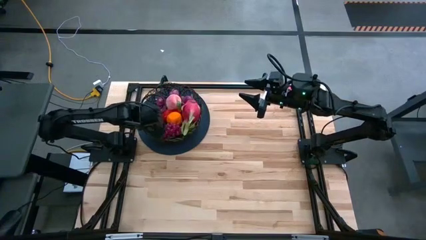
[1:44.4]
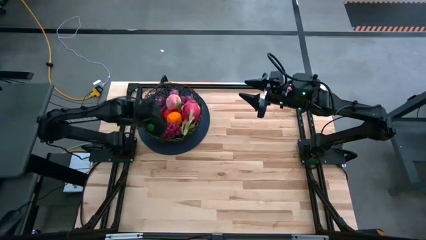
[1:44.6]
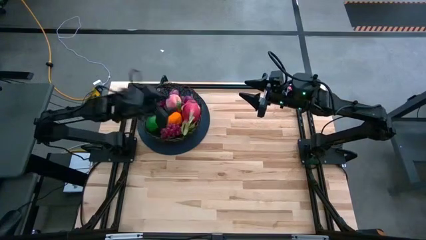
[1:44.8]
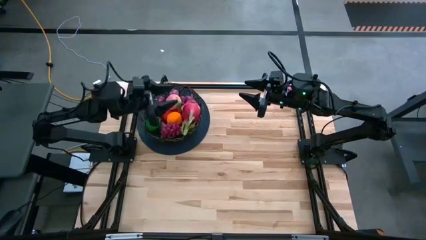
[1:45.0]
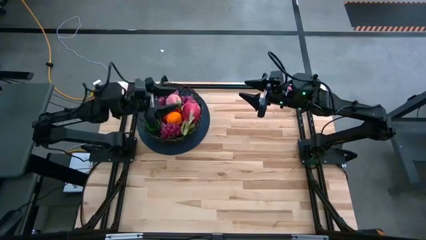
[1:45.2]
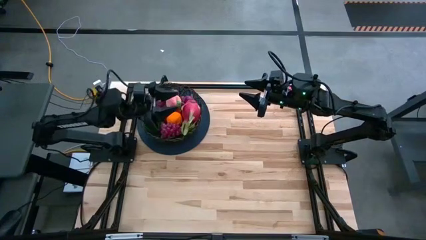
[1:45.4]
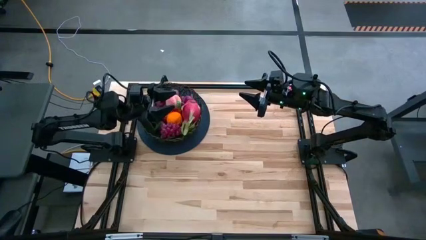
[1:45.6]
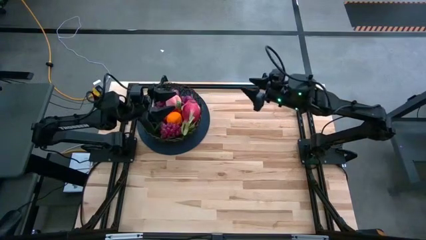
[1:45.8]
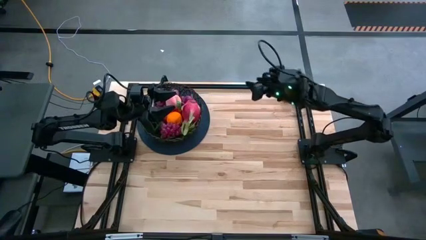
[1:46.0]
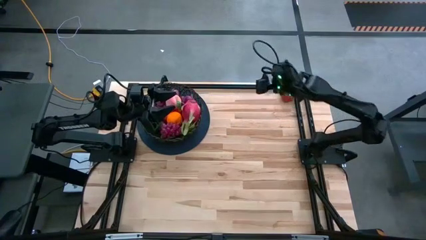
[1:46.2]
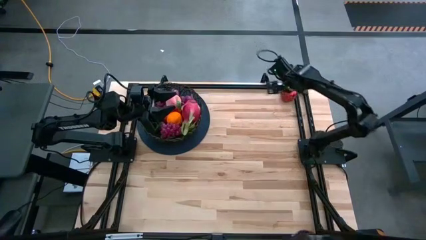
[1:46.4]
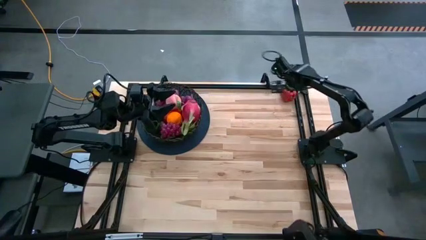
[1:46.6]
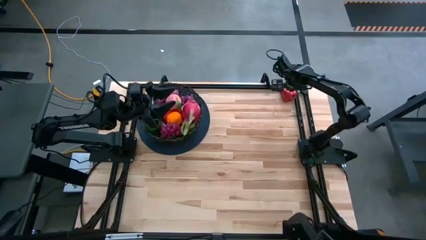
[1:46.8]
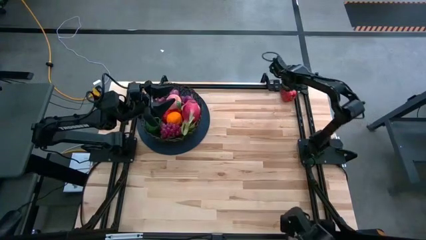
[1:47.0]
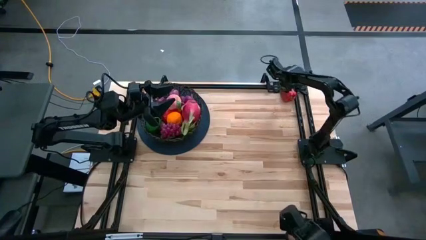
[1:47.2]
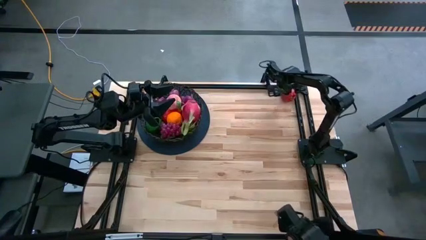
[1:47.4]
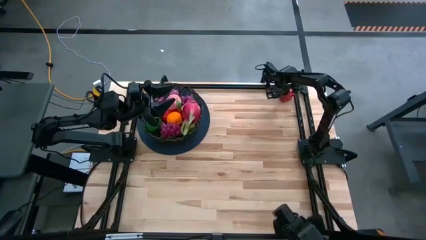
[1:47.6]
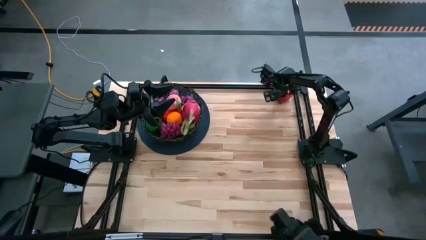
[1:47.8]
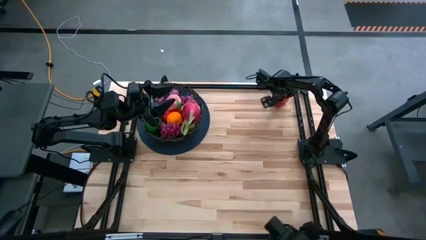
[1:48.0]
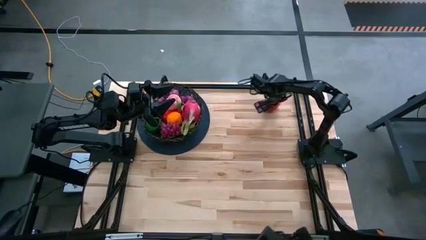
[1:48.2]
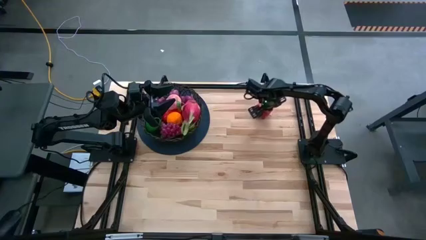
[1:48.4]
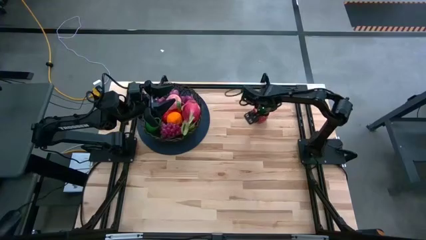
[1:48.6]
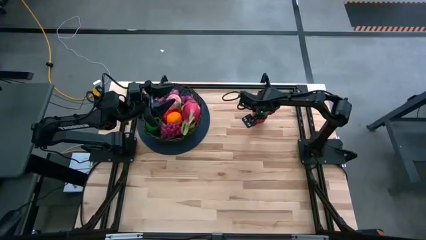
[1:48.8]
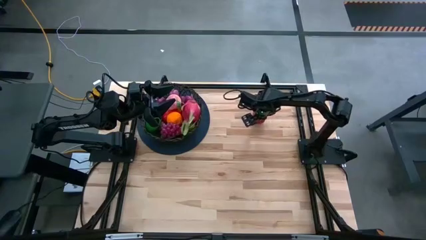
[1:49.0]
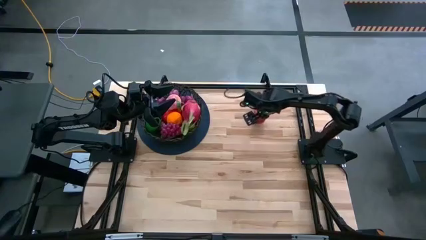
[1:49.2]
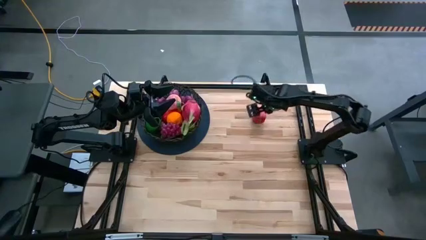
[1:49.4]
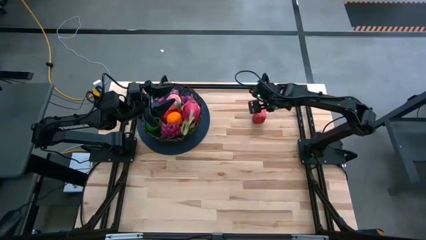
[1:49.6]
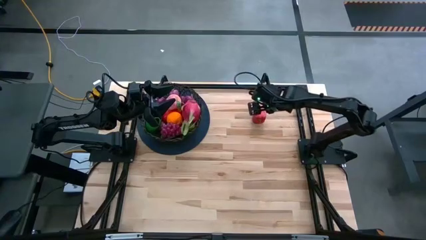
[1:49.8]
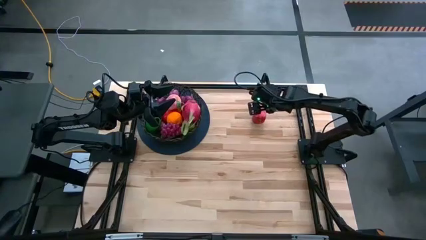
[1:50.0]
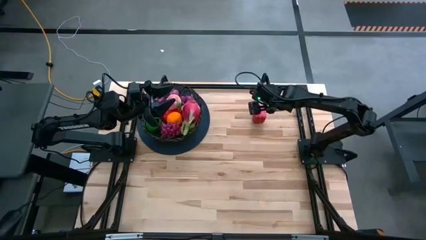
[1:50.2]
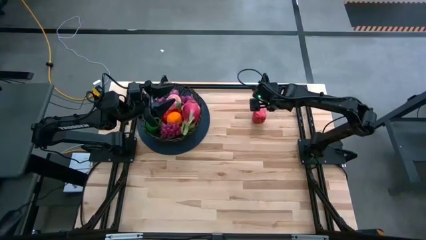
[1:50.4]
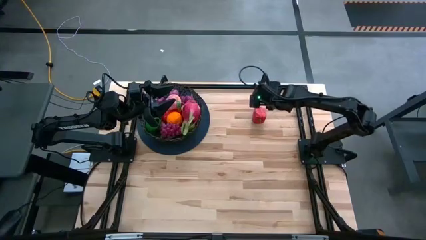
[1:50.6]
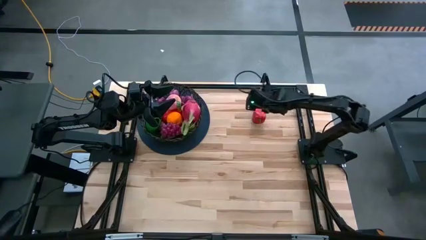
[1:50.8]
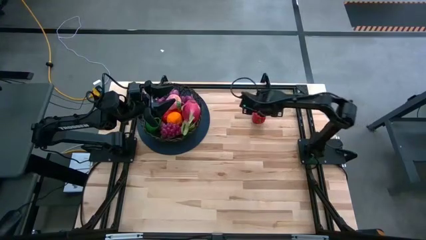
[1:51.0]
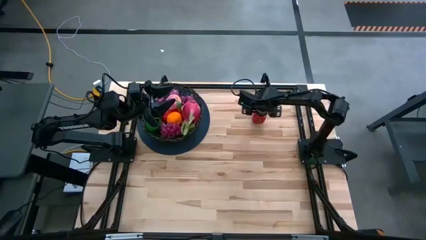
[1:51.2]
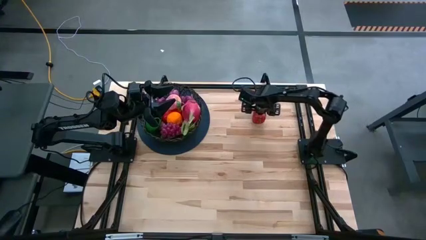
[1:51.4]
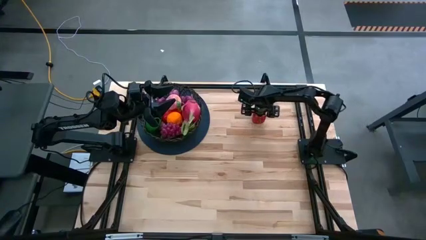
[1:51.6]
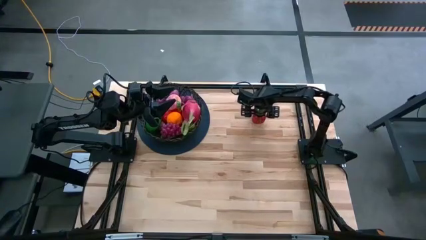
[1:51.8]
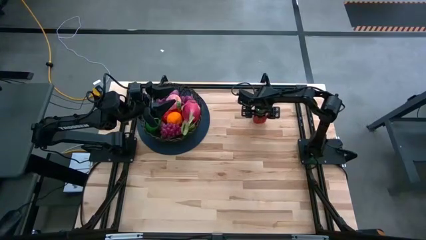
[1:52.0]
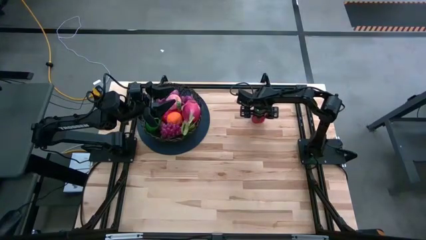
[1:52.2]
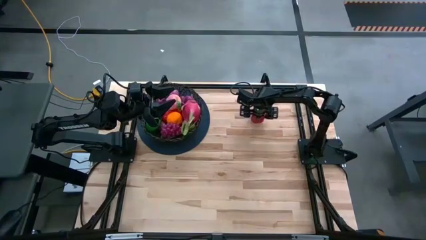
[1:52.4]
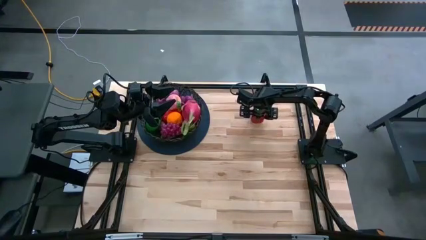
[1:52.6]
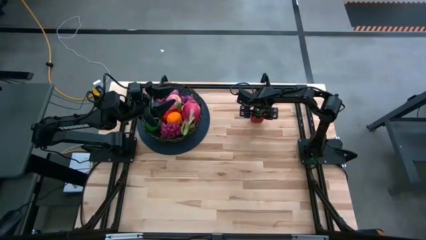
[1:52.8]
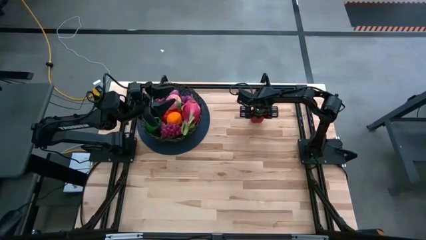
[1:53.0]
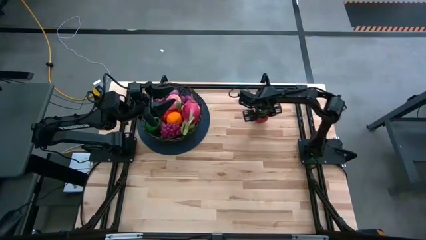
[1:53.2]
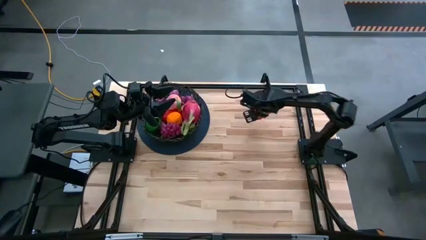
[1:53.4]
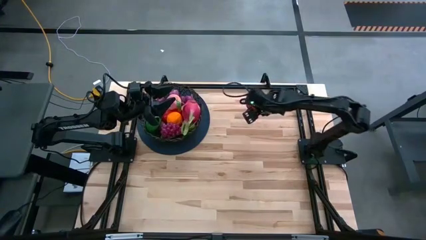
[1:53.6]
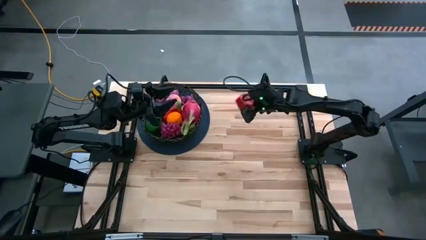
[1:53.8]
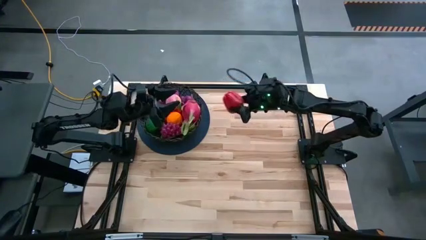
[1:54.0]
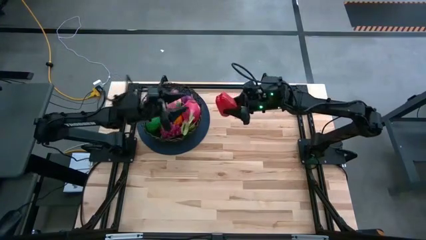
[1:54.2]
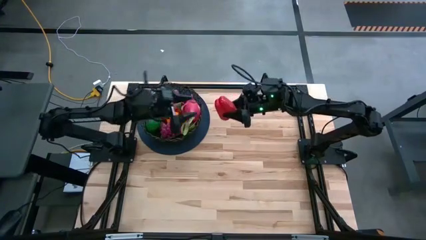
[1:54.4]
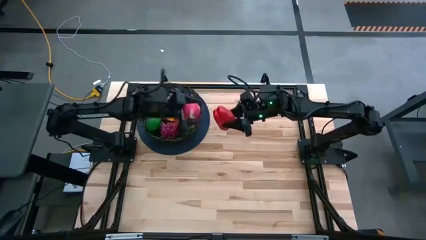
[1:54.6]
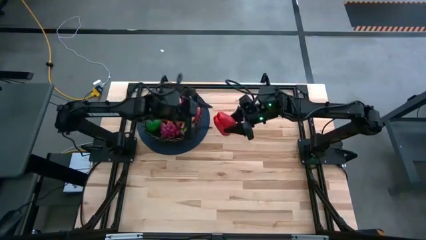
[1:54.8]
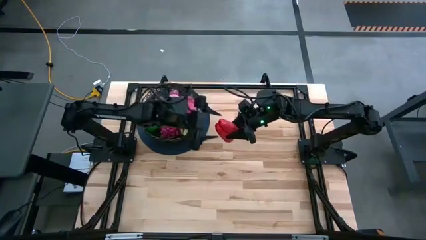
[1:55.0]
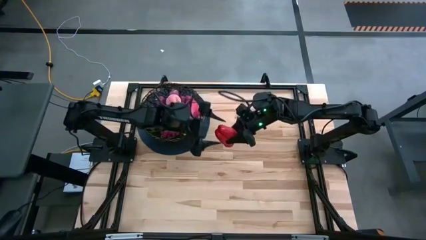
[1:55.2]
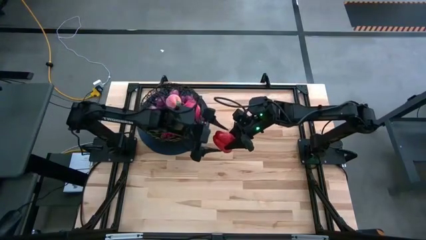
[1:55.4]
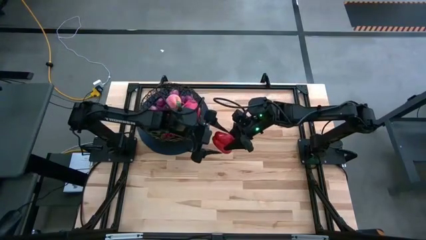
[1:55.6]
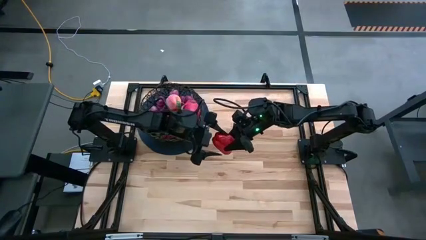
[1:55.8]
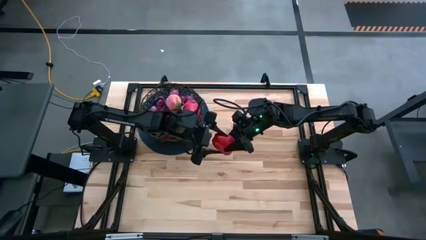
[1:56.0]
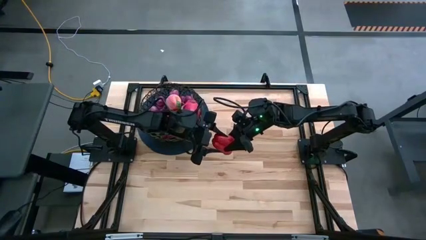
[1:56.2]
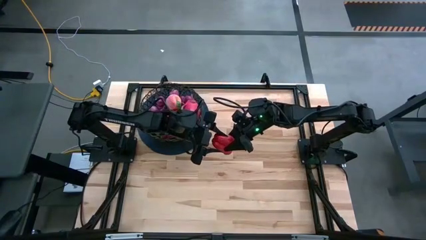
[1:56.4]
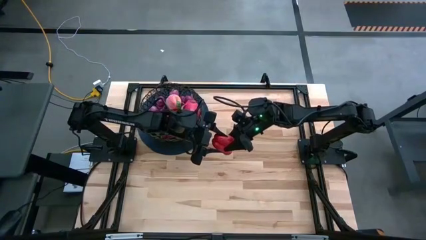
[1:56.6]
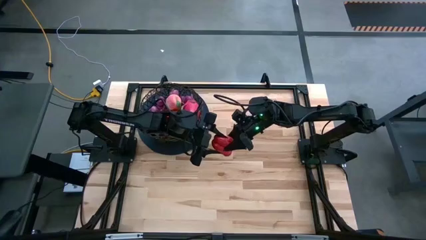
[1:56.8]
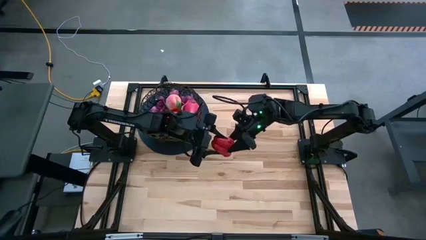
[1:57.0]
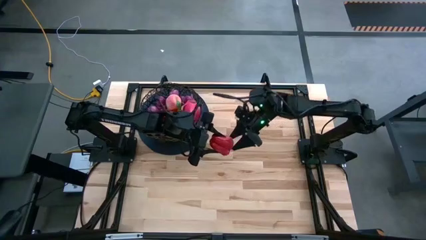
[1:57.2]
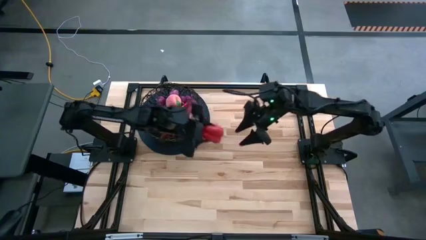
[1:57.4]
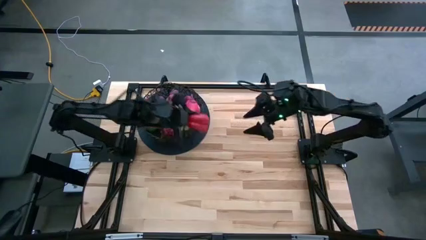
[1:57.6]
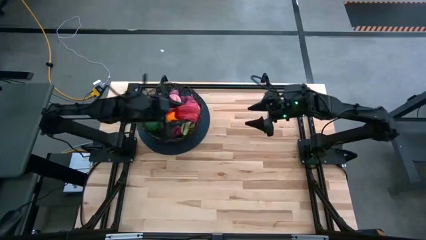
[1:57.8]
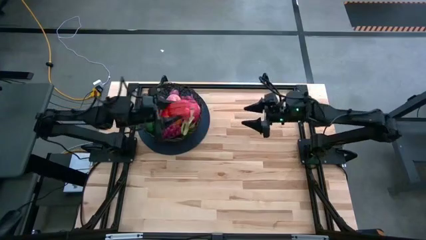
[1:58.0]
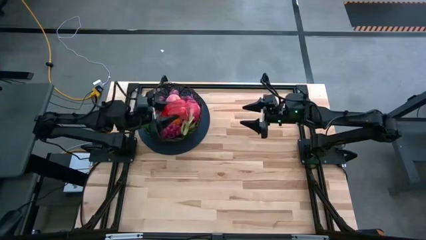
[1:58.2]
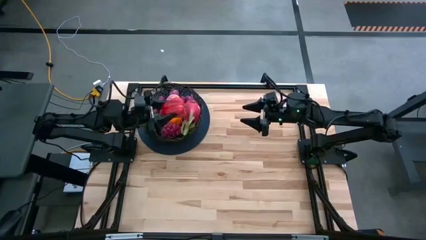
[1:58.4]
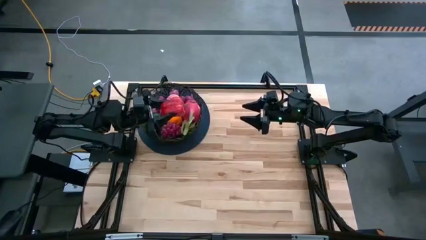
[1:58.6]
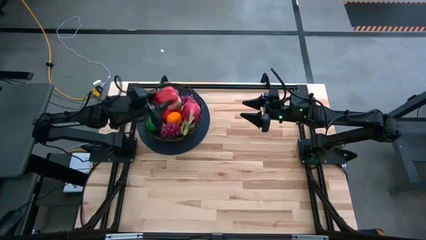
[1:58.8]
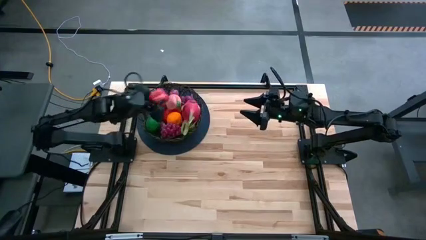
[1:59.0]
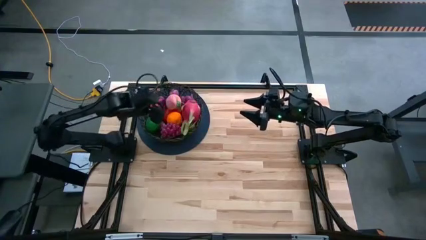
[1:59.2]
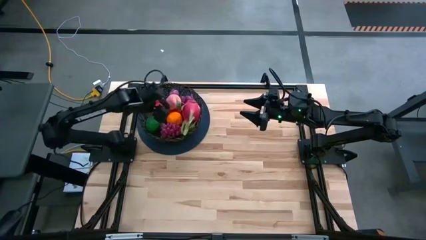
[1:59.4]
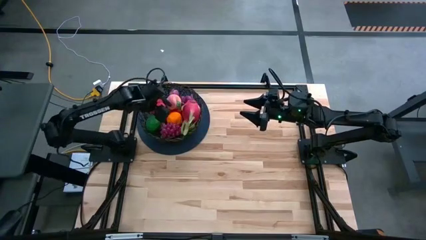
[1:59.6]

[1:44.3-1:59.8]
Task: Build produce basket
Put the red bell pepper into the black wire basket

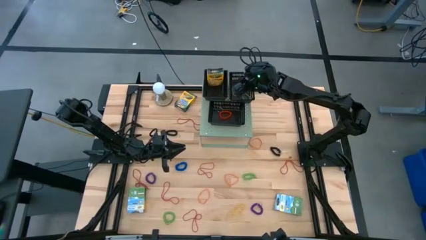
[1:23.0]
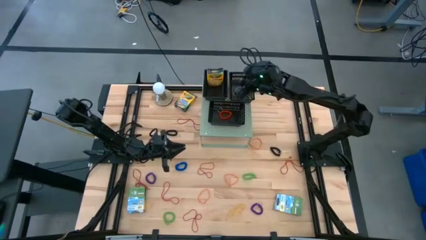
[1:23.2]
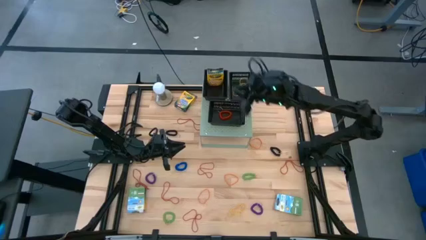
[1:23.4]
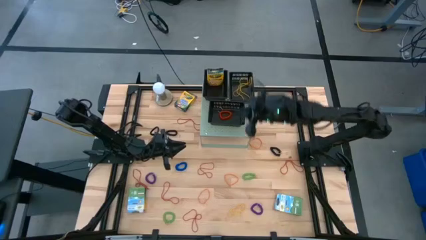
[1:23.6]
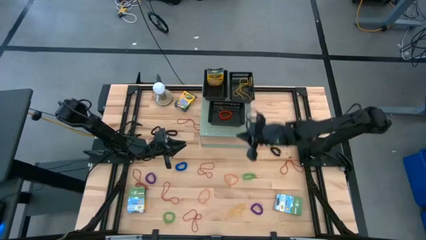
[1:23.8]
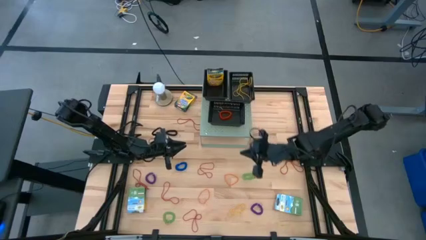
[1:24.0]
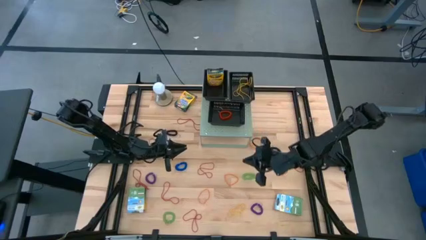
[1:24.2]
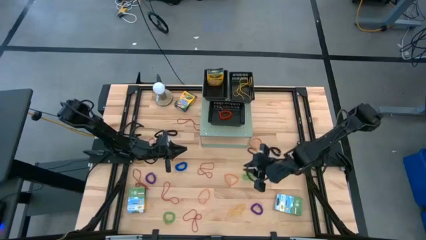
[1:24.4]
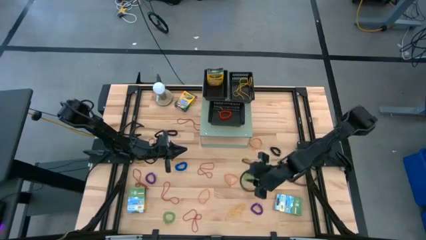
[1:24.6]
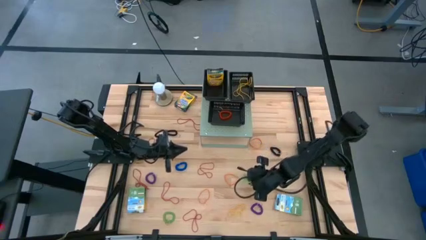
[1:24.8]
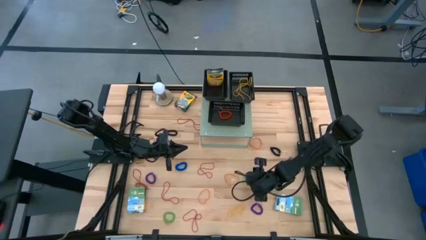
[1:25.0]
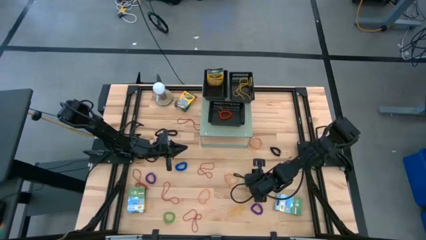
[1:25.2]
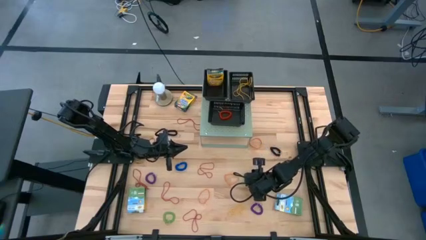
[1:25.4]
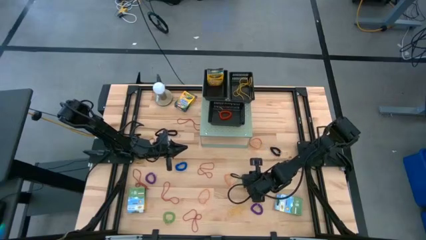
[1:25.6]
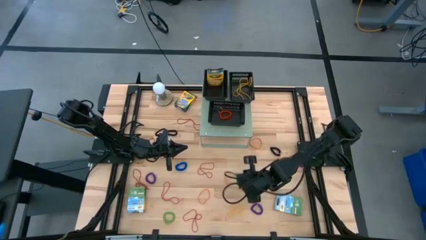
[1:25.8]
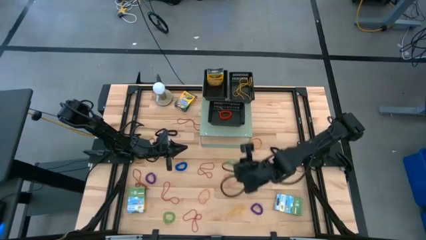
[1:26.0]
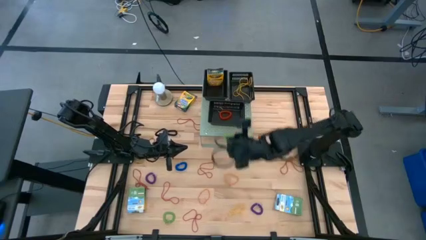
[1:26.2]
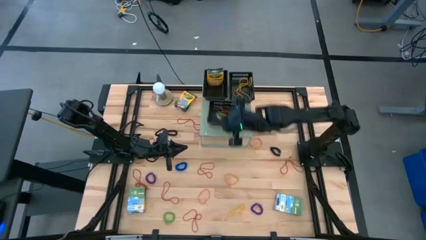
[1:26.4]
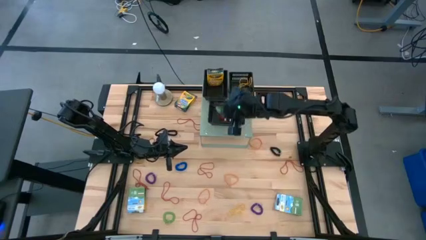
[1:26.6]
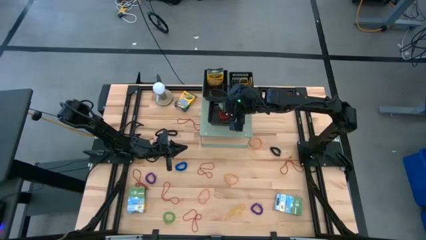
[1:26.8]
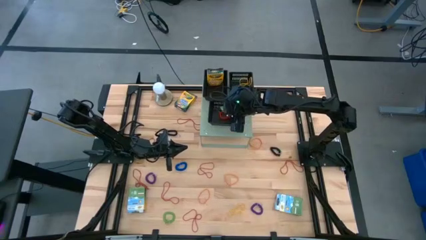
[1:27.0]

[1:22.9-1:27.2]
Task: Pick & Place Office Desk Supplies
Put the green spring keychain into the bottom black bin on the shelf
